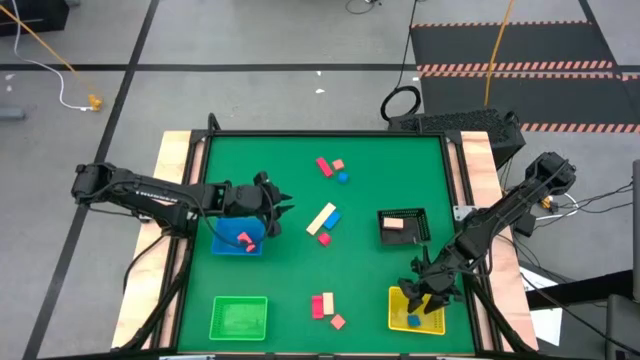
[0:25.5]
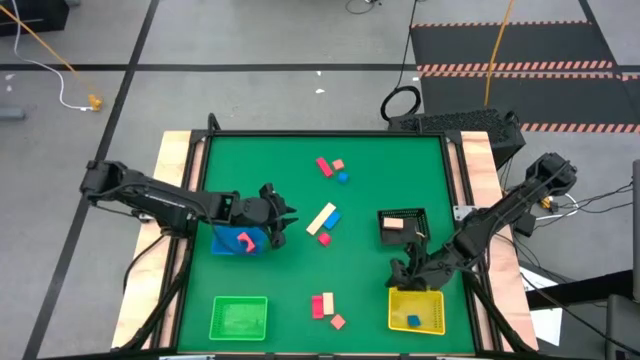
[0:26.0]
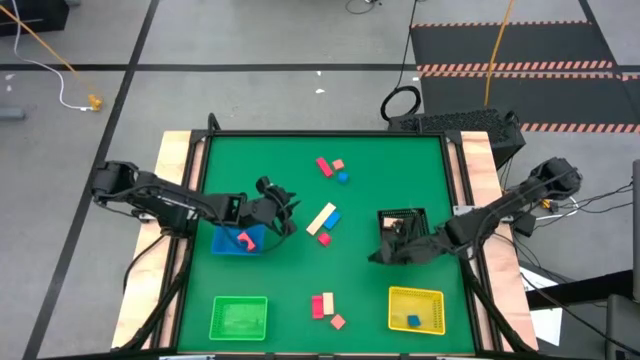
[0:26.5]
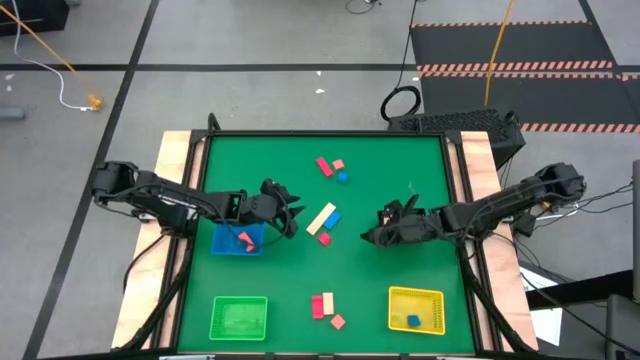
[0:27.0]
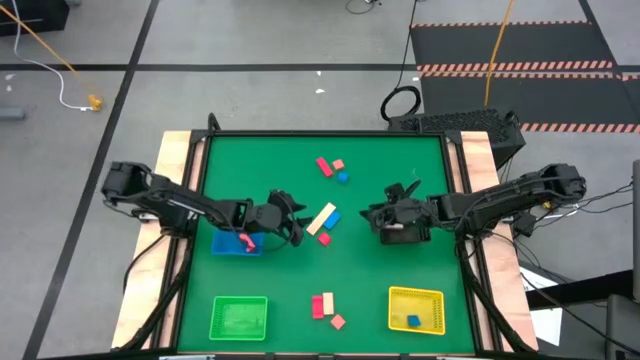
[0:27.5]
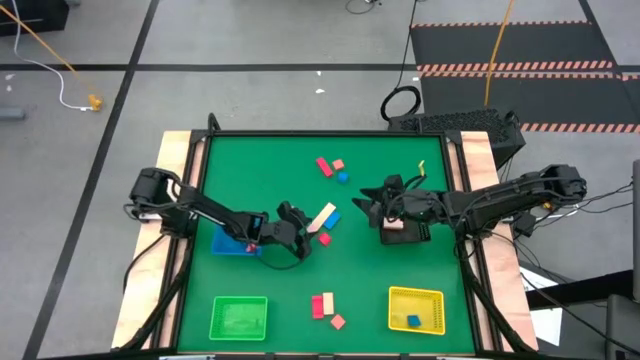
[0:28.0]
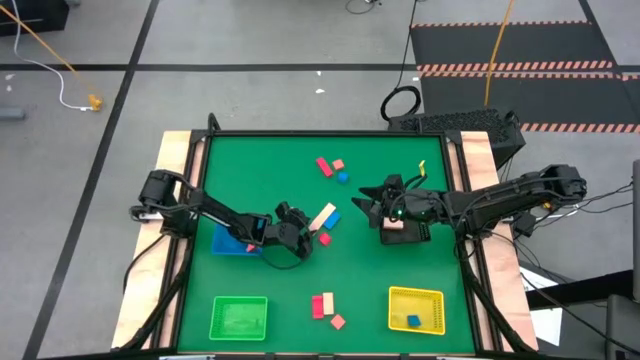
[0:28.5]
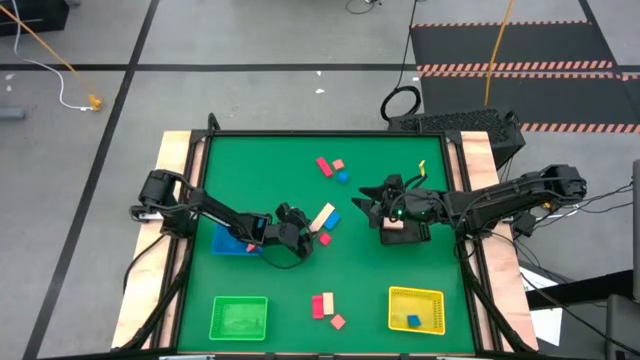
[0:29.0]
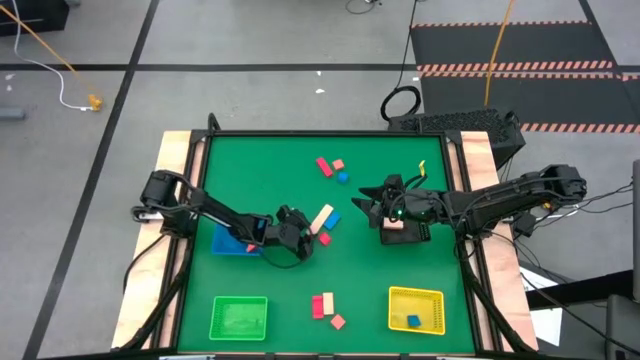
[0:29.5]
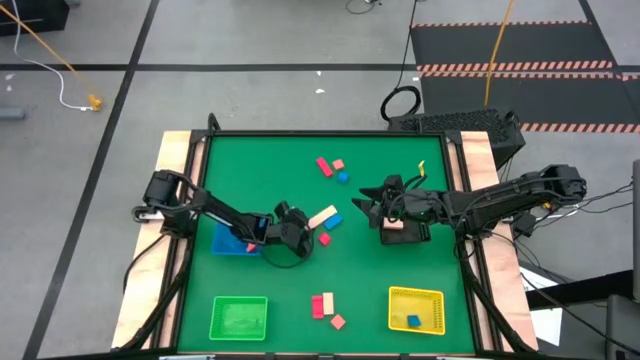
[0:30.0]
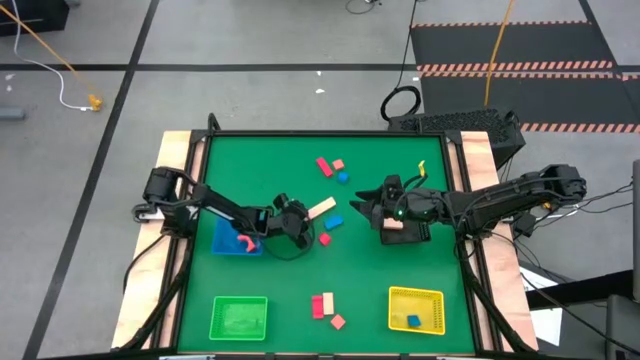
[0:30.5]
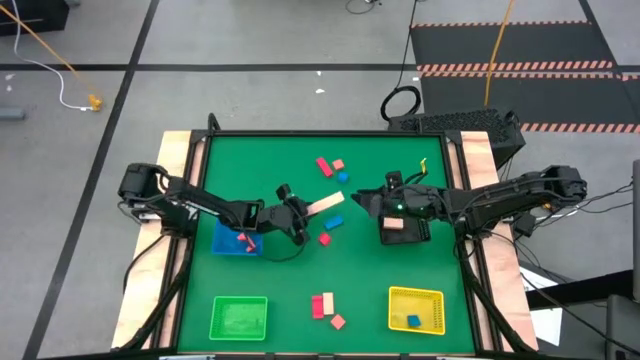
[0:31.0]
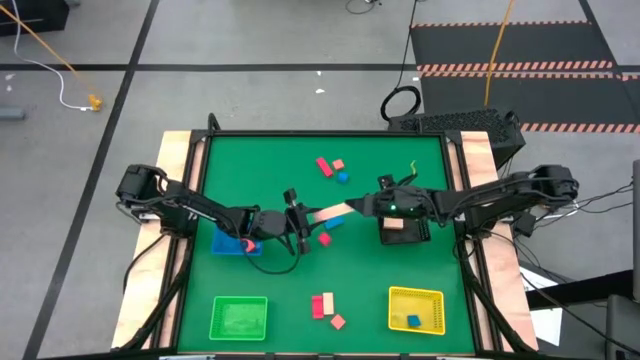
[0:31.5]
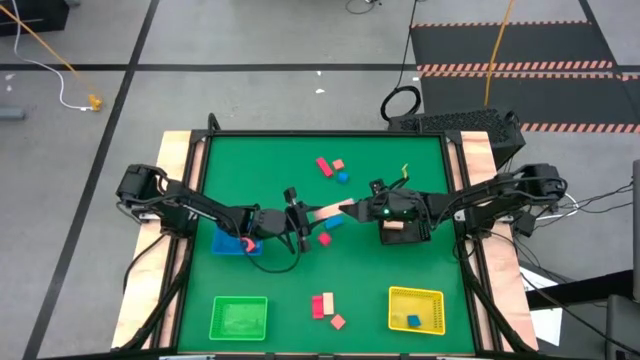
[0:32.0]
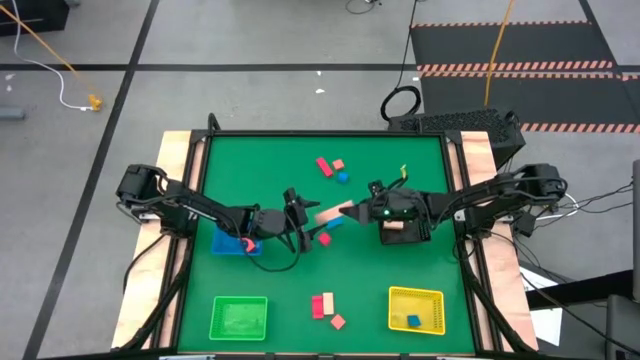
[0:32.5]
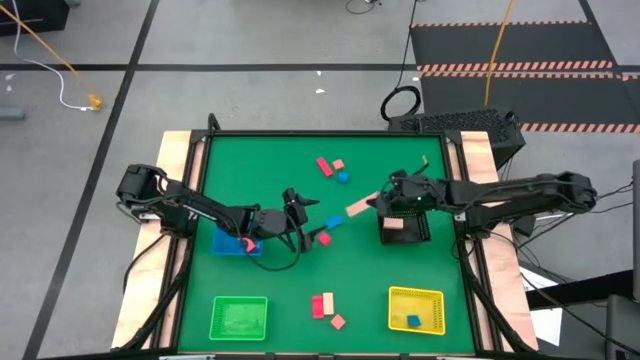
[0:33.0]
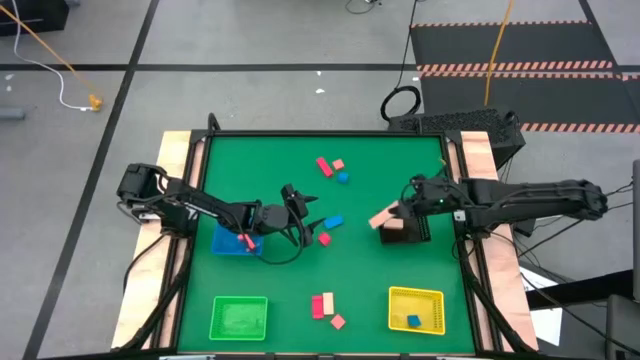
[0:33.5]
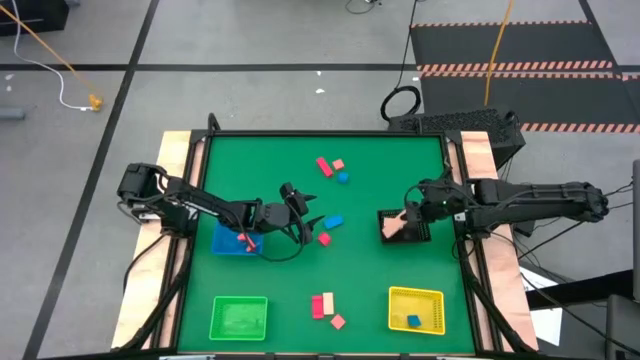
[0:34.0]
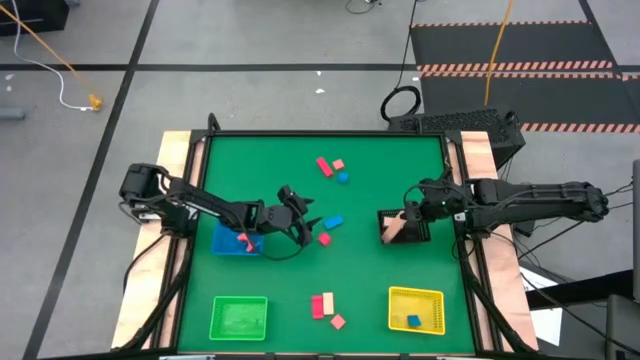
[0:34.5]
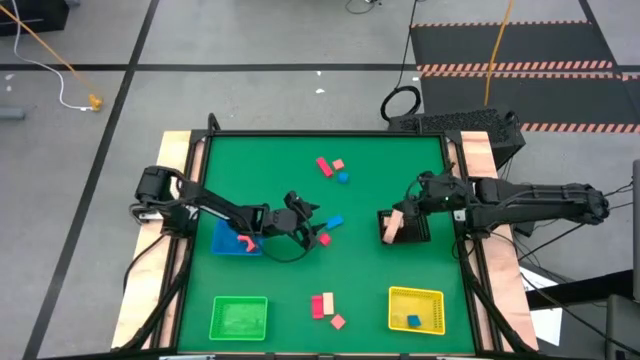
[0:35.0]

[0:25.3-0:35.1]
Task: Sort & place blocks by color
Put the top white block into the black bin

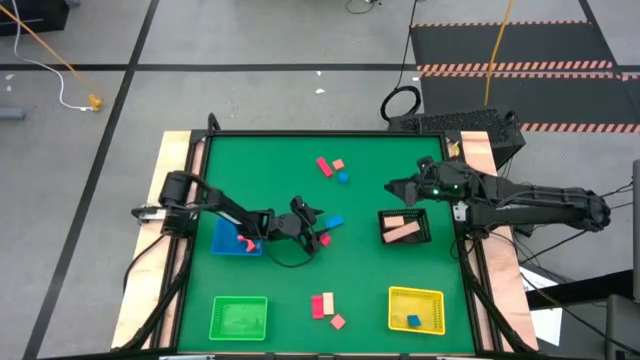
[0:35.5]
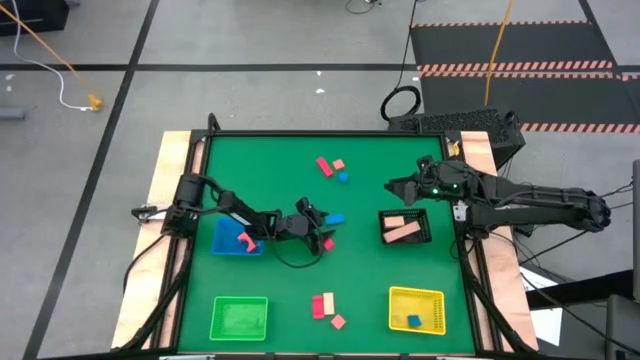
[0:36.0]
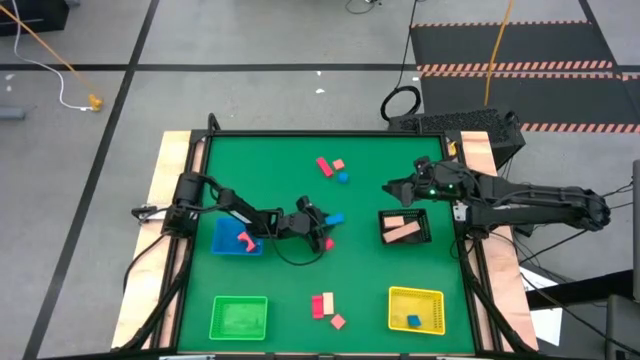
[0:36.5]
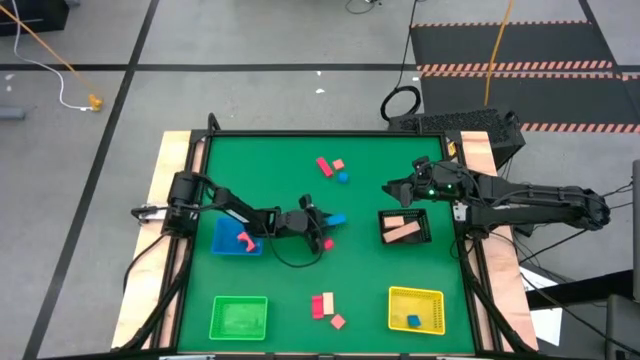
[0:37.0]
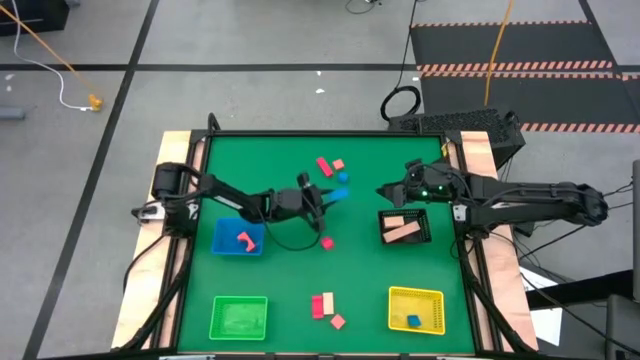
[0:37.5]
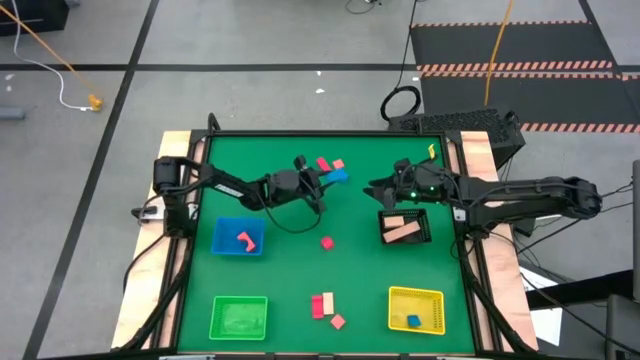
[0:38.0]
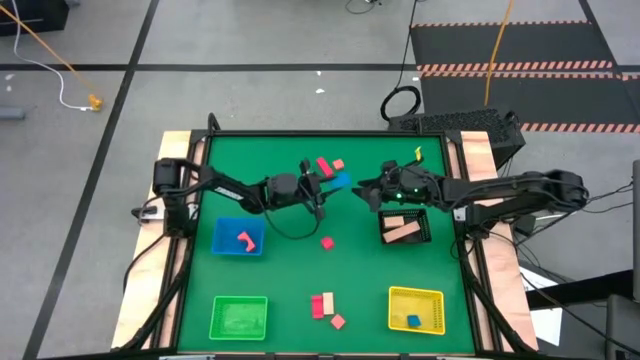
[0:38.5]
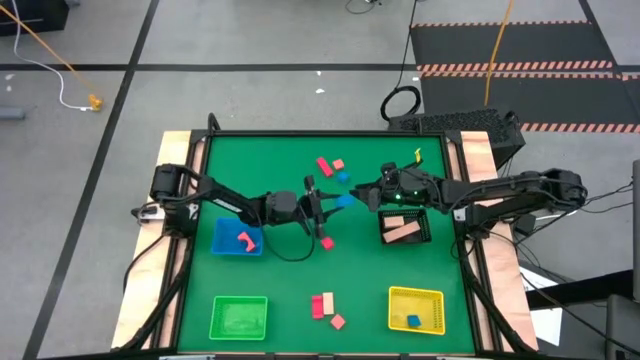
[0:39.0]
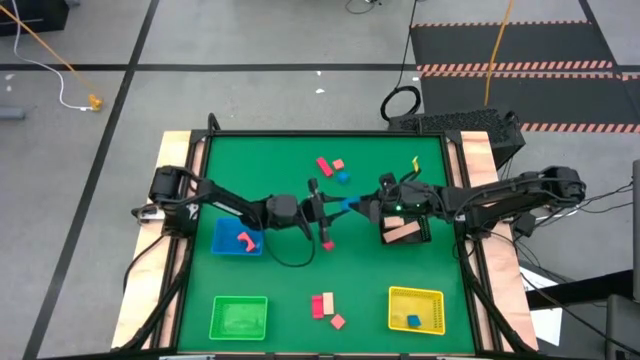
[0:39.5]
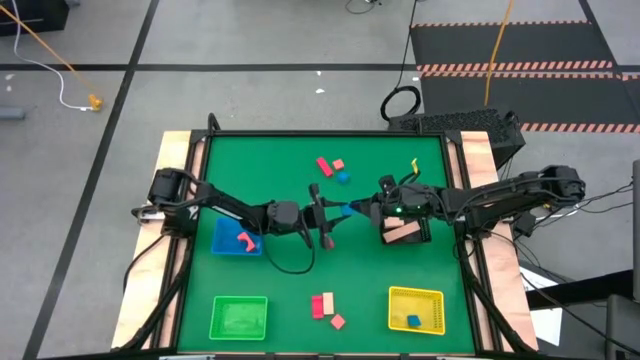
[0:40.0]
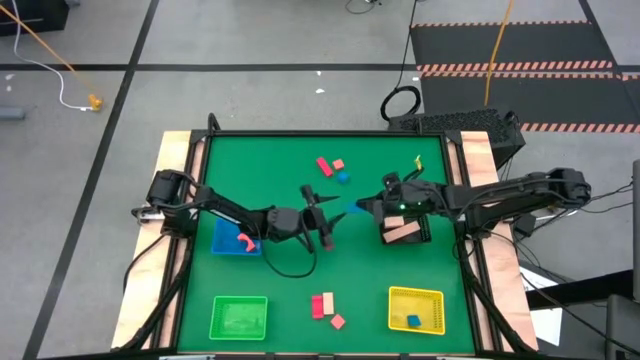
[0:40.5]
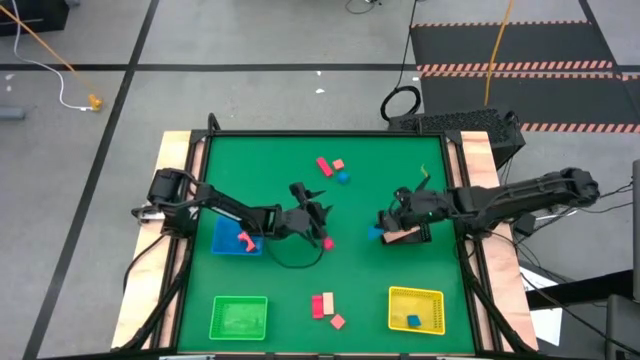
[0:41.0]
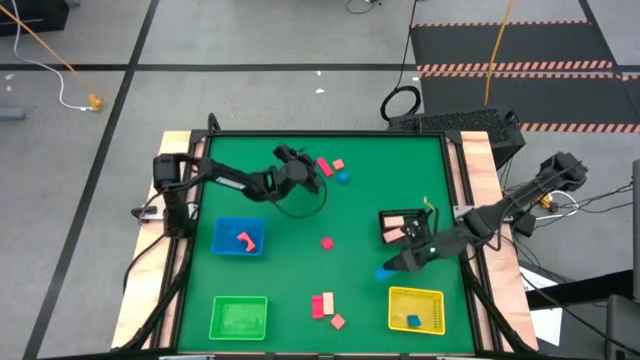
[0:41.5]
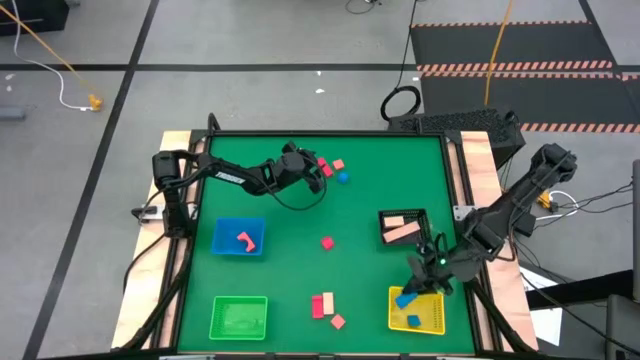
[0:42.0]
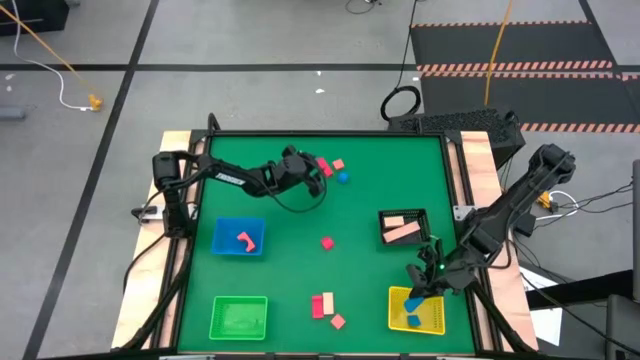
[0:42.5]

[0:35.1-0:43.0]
Put the bottom blue block into the yellow bin

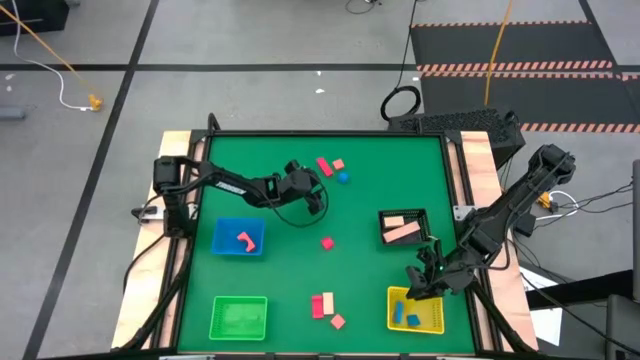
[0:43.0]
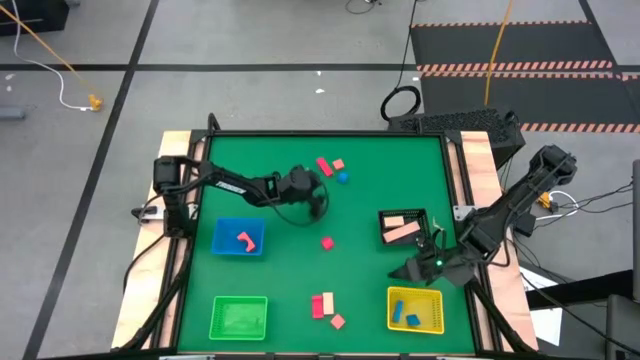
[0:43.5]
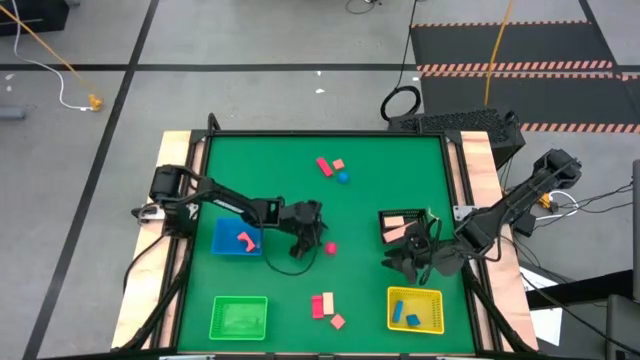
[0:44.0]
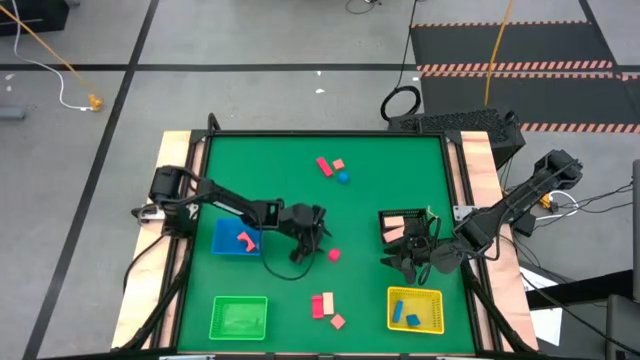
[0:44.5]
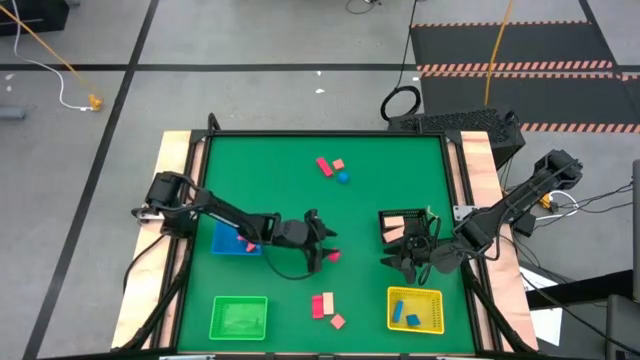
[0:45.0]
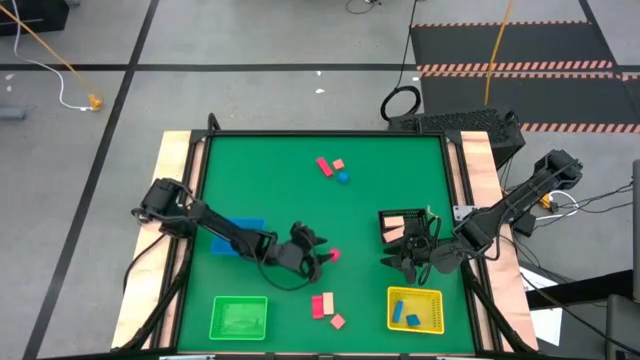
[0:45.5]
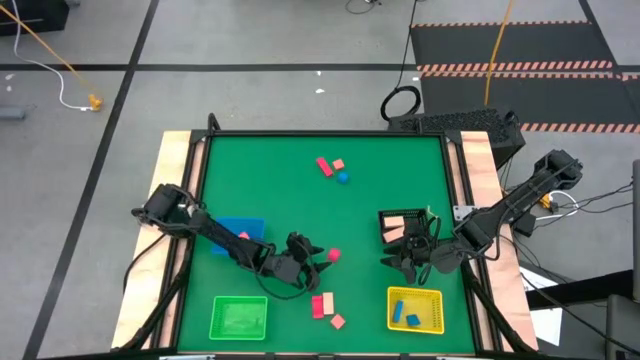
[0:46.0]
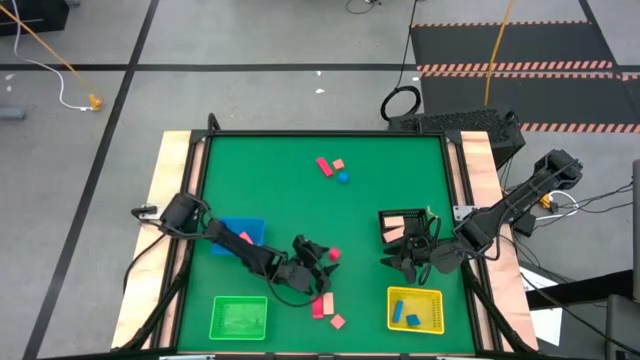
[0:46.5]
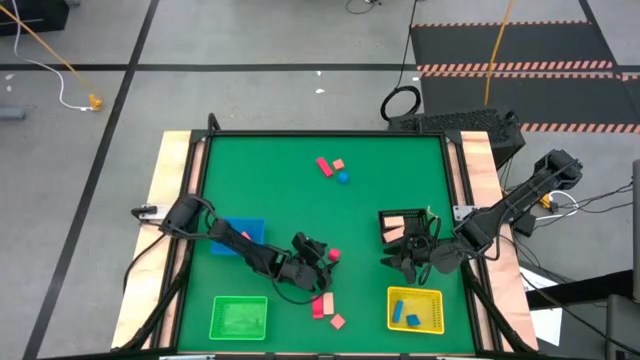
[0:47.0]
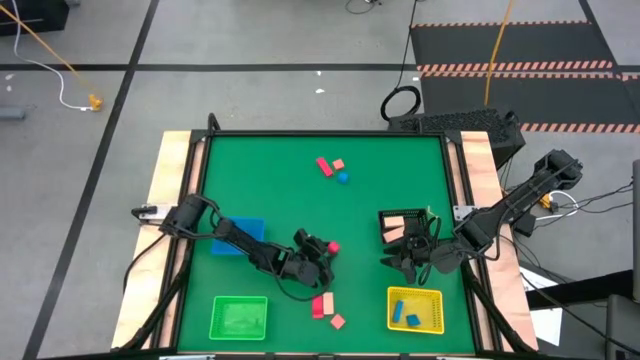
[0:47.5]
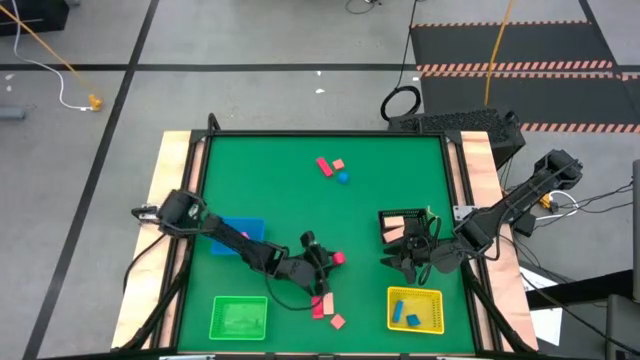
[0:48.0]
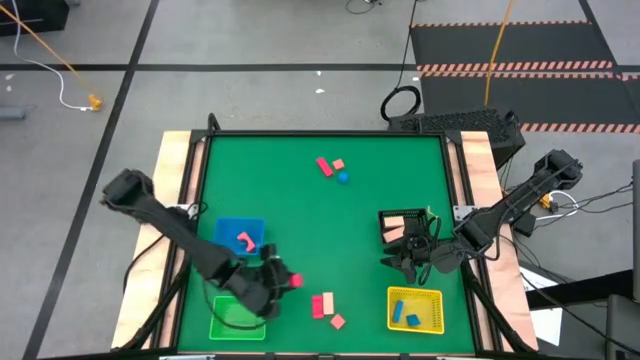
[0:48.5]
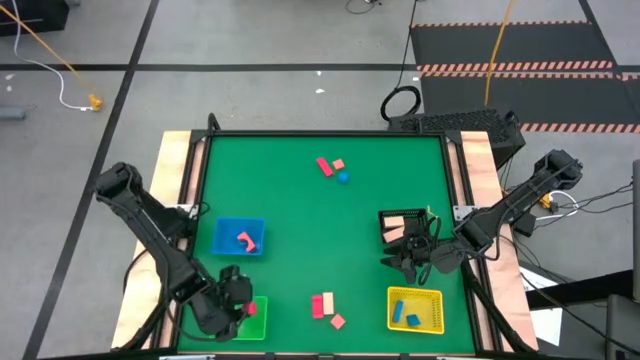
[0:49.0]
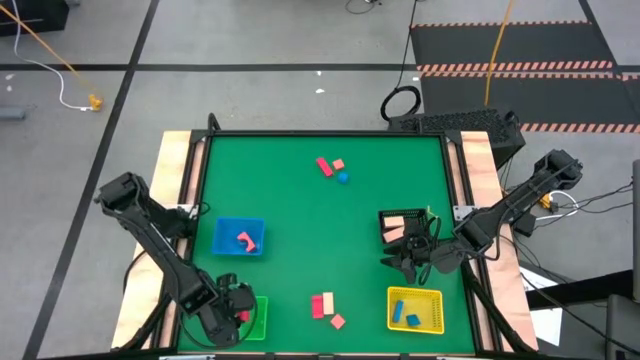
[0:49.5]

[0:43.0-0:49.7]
Put the middle red block into the green bin
